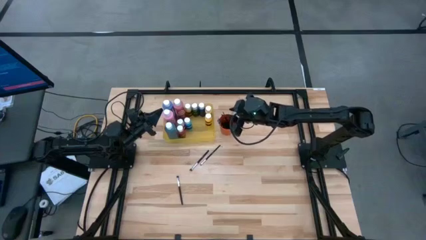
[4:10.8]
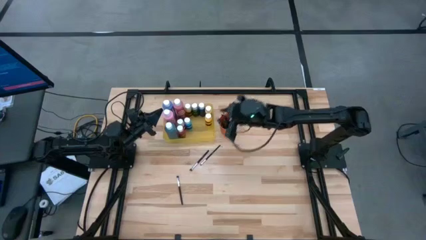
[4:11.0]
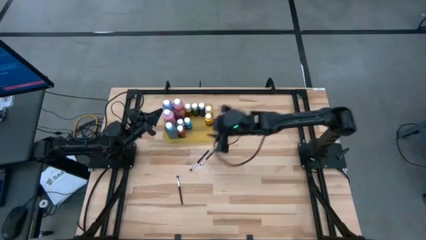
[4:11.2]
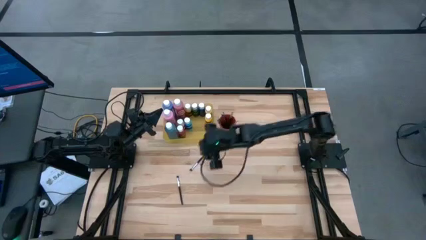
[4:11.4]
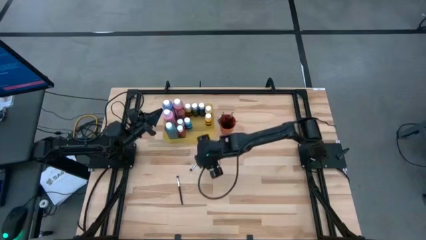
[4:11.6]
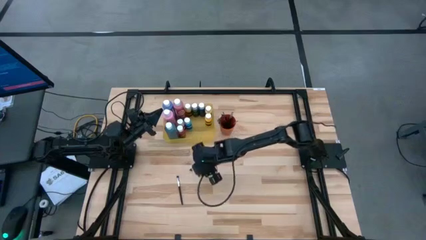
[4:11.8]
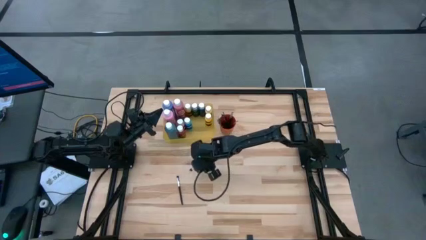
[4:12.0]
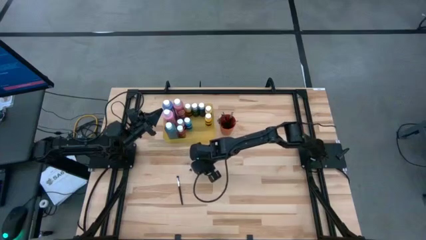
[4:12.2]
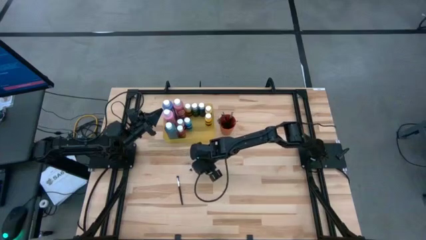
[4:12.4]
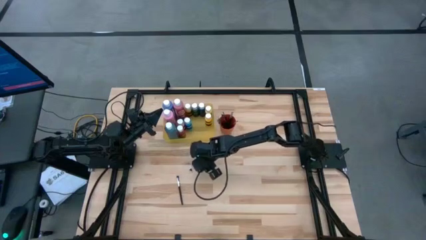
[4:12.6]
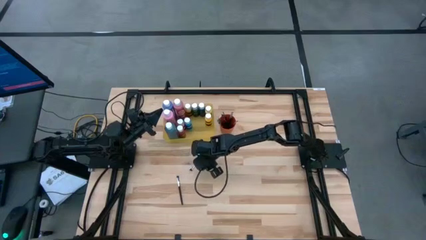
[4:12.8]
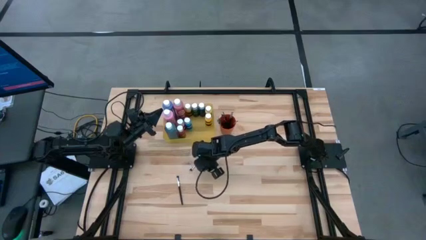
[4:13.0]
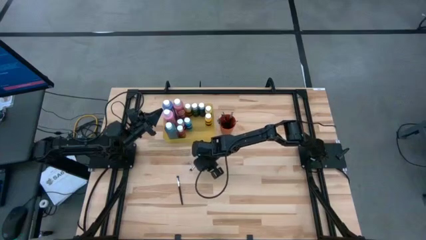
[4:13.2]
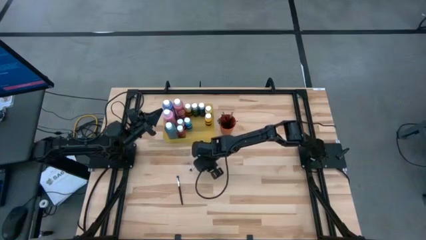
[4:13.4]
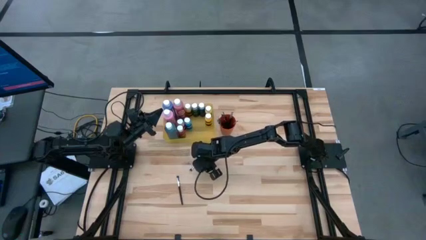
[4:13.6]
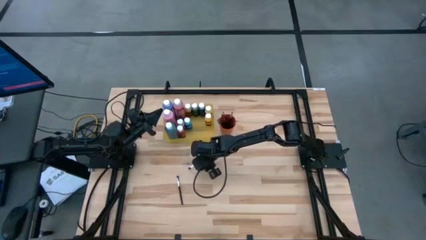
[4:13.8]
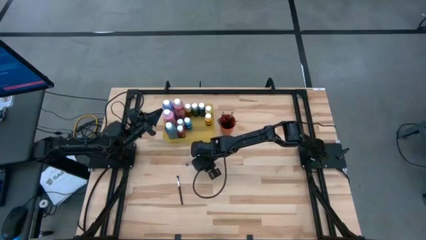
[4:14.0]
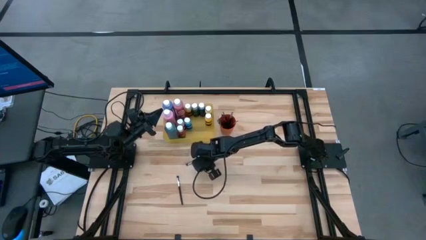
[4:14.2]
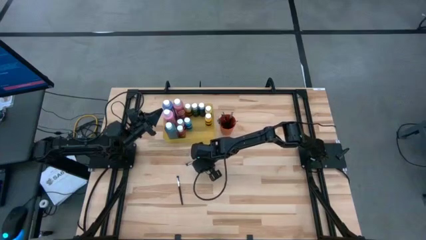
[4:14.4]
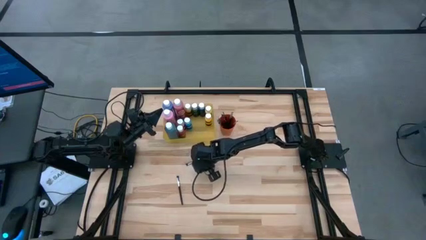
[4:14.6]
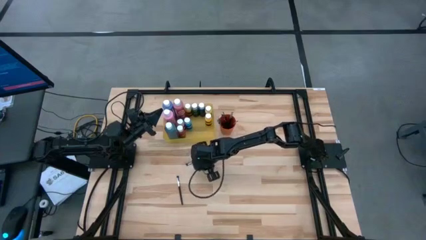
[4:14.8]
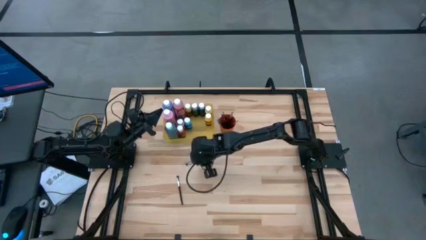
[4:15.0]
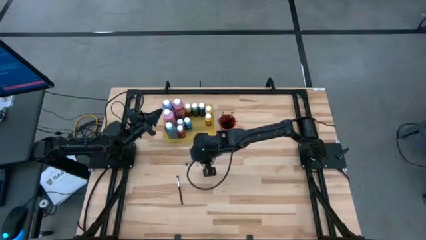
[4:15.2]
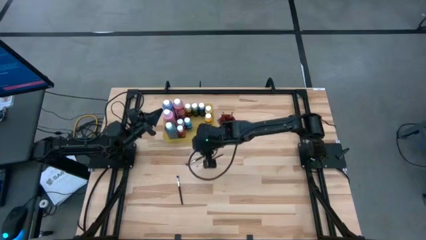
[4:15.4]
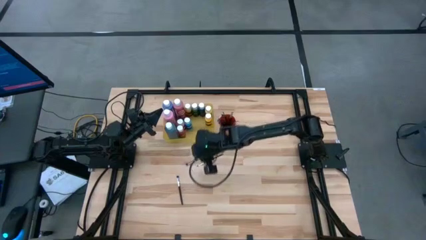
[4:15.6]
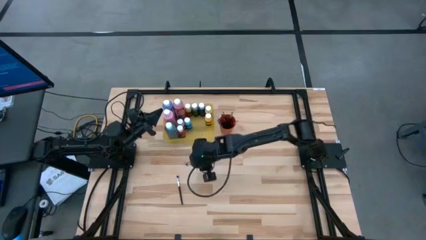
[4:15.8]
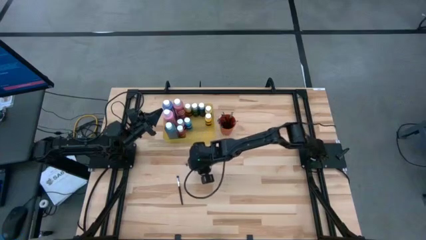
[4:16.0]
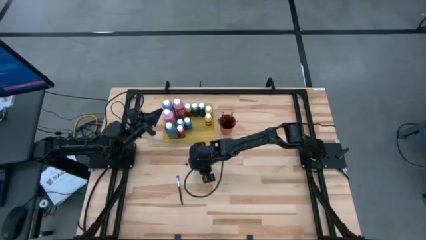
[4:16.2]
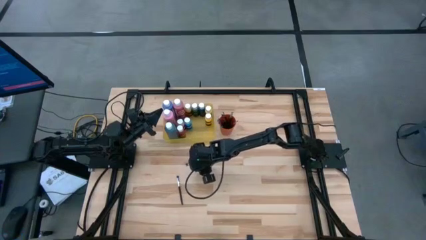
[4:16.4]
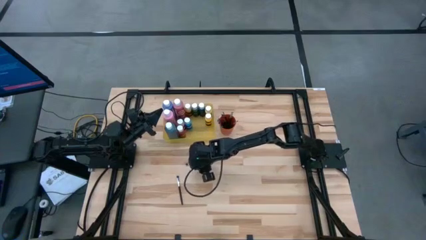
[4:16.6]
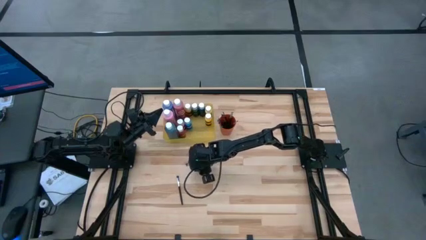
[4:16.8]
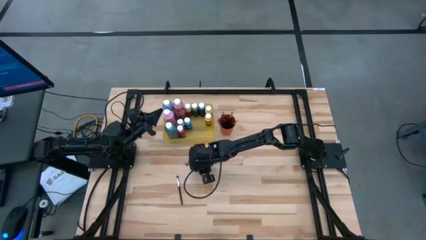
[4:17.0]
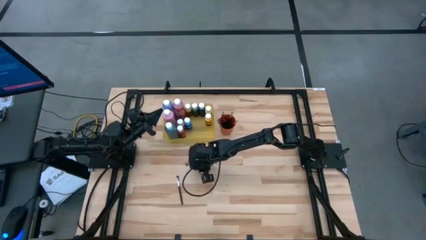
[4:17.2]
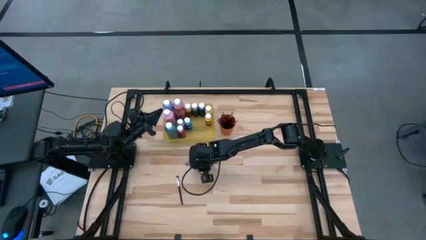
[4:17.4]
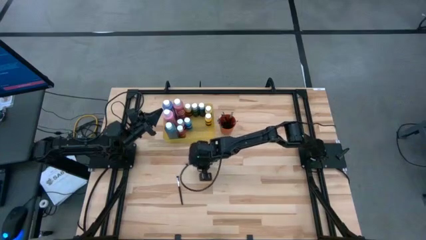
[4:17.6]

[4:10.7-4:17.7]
Task: Pick & Place Paint Supplies
Put the silver paint brush into the orange cup

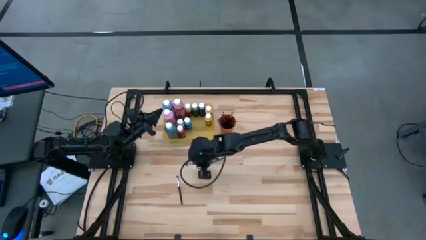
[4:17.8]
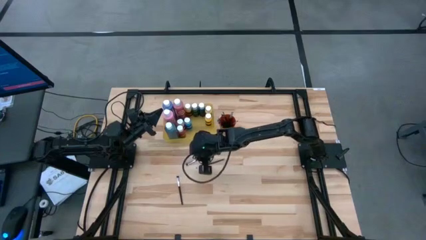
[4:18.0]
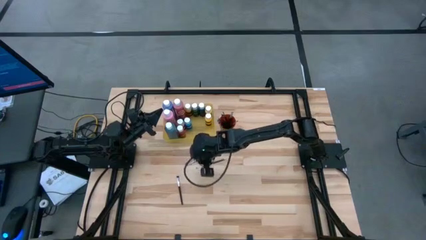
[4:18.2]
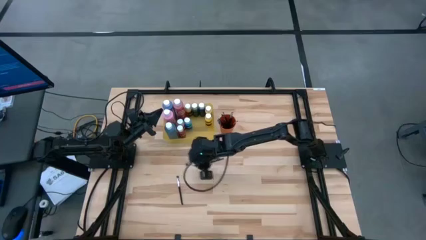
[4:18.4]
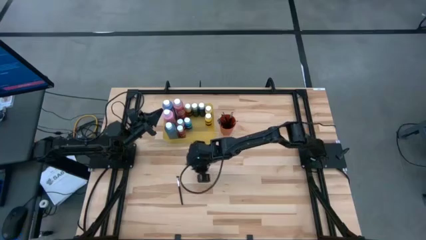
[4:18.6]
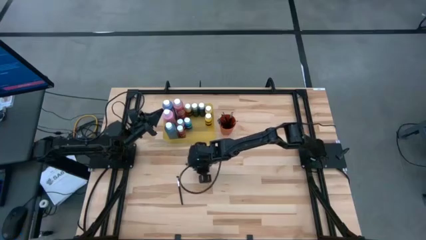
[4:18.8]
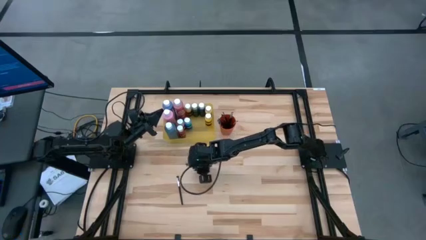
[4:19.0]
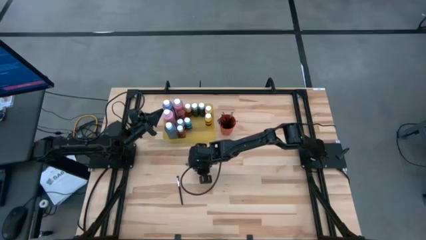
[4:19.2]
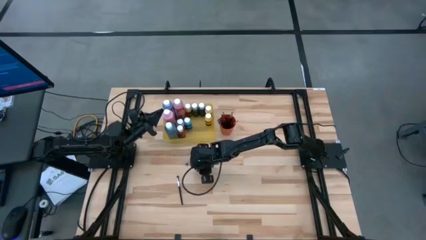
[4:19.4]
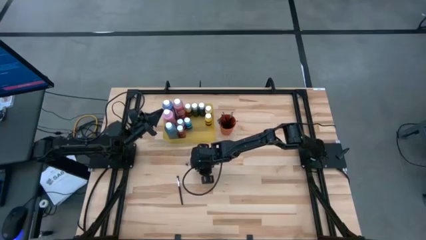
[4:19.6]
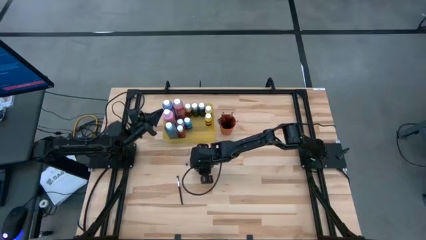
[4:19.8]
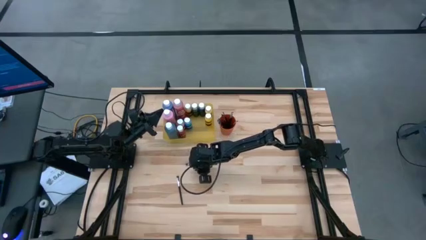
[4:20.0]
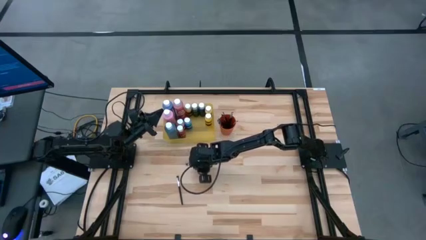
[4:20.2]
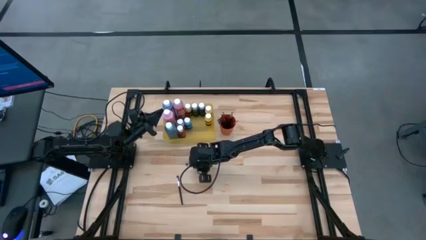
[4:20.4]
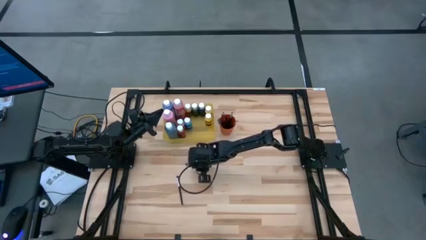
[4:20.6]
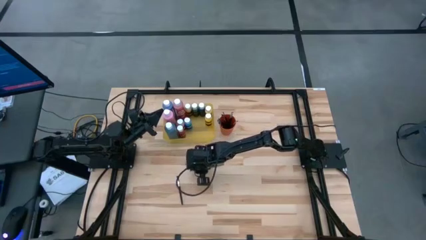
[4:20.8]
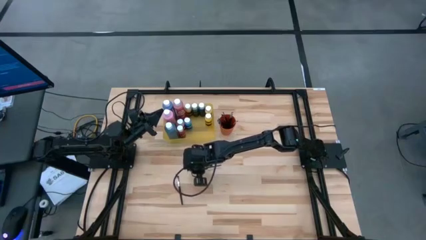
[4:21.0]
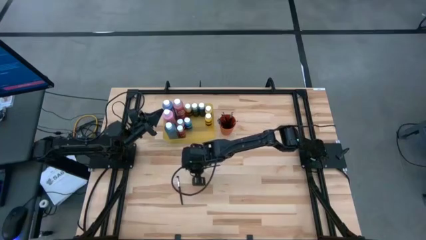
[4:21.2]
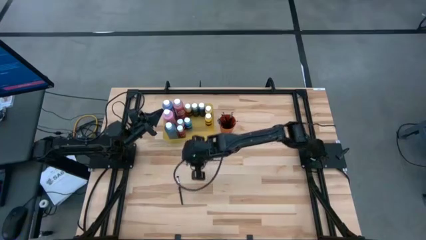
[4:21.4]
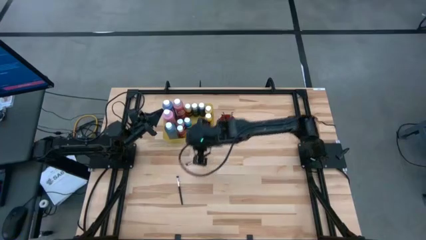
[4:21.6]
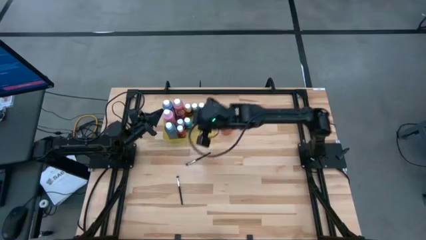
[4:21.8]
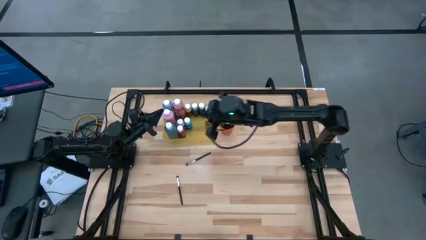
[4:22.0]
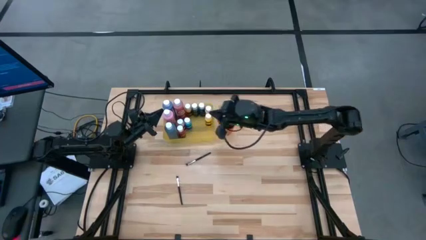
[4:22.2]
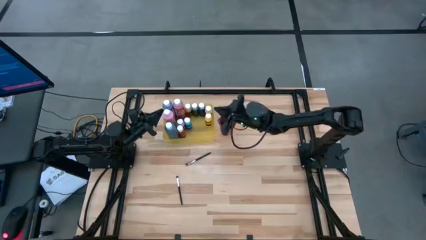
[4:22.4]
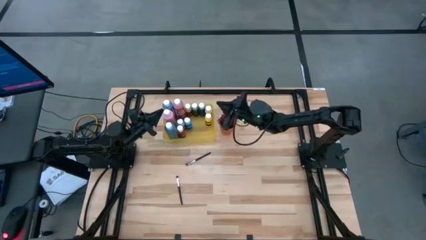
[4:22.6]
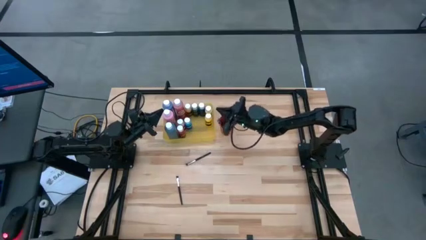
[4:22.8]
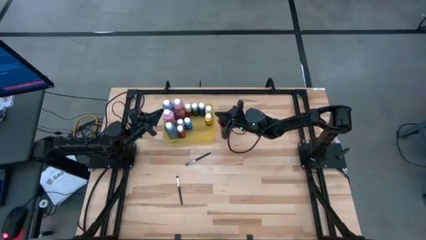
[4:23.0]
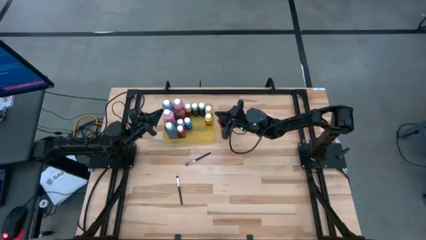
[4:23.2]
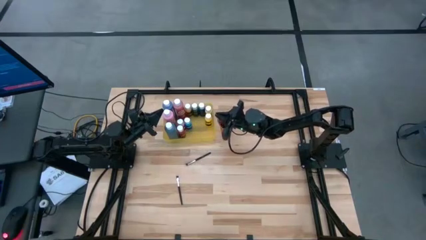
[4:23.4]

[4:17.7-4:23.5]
Put the silver paint brush into the orange cup

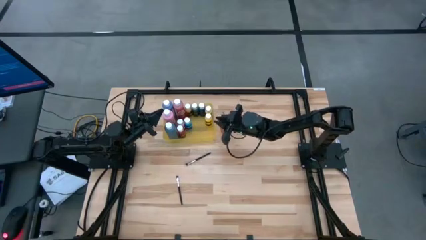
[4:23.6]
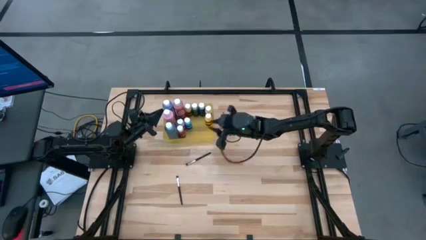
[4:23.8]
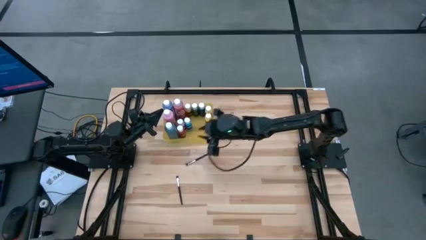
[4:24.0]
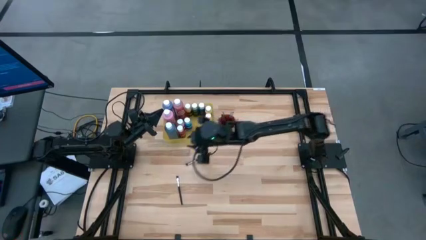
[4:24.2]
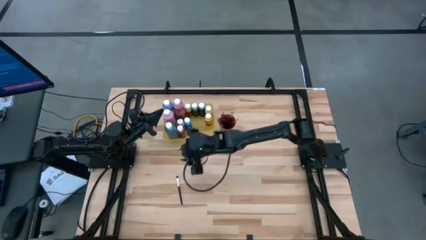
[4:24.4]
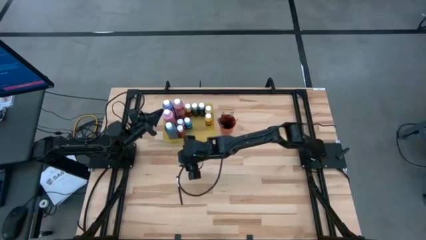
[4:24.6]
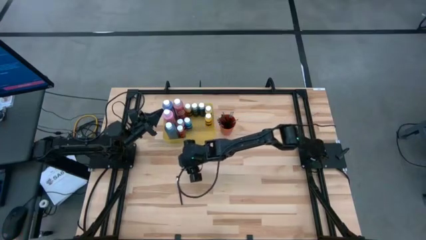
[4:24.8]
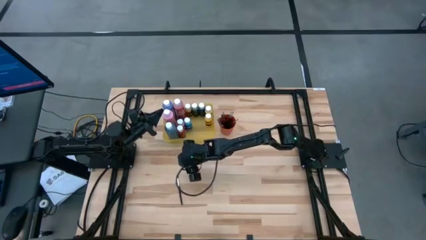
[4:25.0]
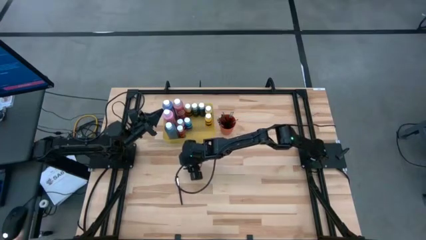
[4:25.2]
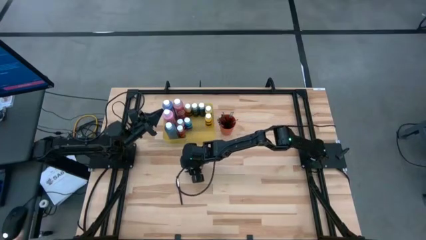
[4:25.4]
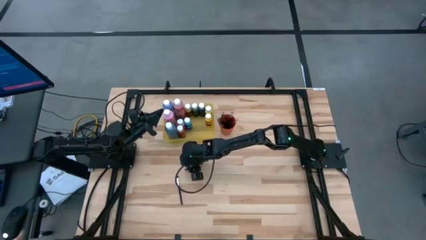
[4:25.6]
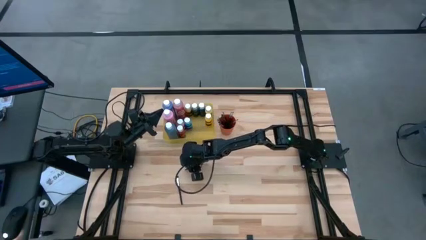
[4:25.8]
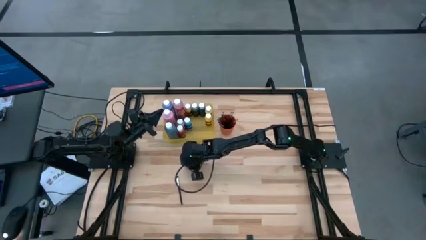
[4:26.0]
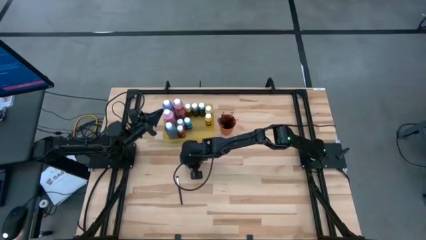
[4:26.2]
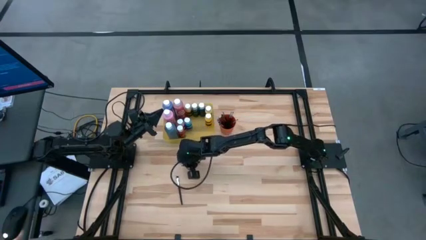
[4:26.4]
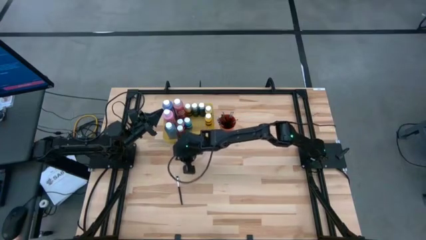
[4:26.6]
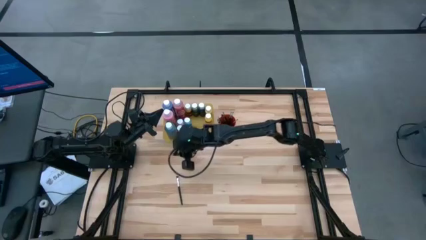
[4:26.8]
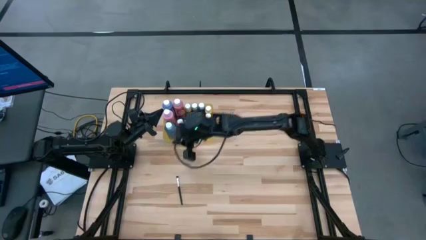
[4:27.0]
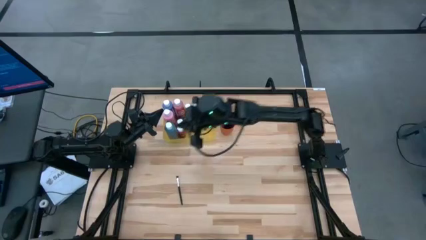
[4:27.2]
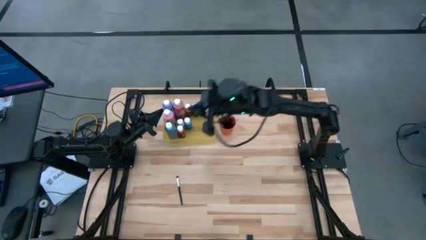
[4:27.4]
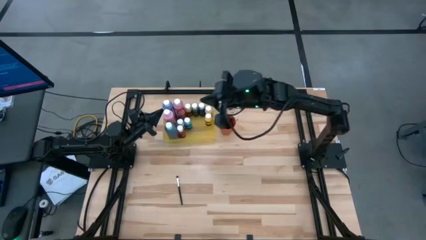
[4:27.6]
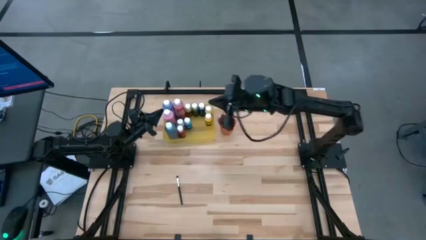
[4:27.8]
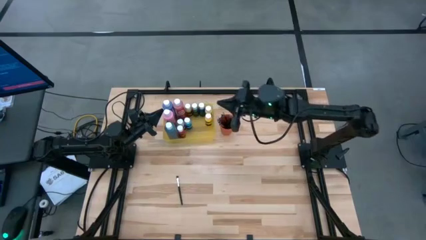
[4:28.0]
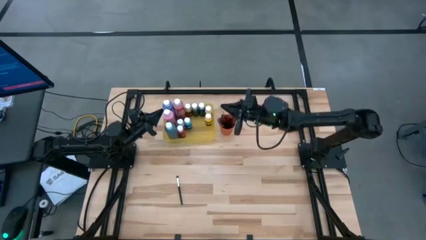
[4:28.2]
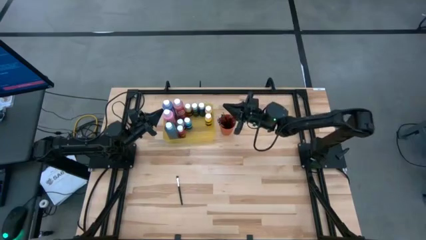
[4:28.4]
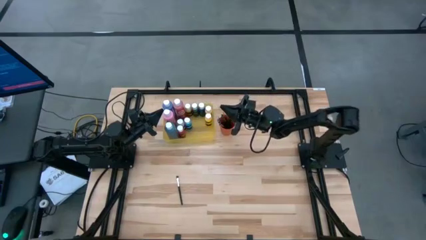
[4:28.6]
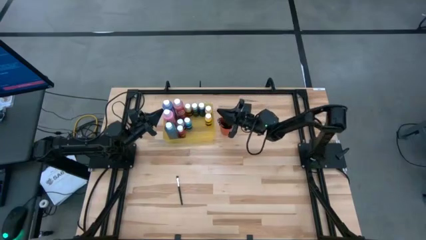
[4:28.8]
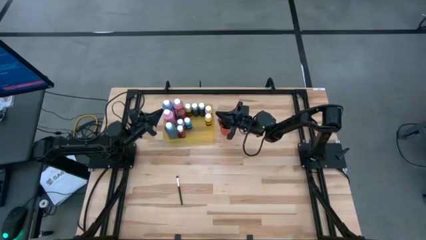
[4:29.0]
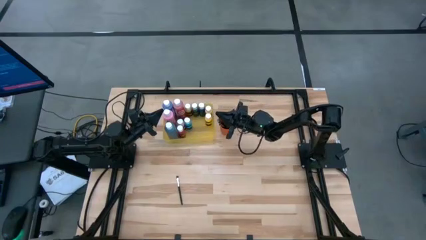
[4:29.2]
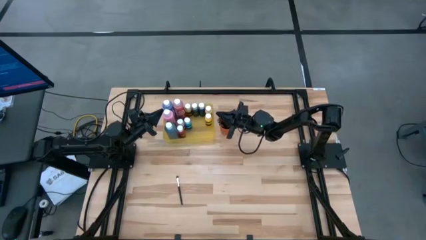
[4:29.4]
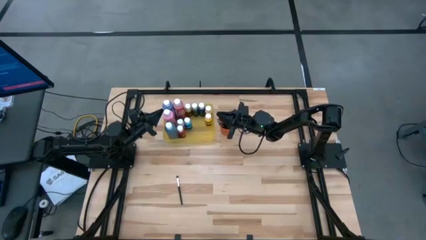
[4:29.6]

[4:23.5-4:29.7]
Put the silver paint brush into the orange cup
